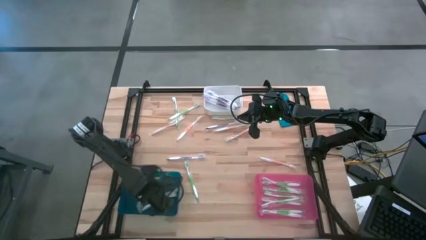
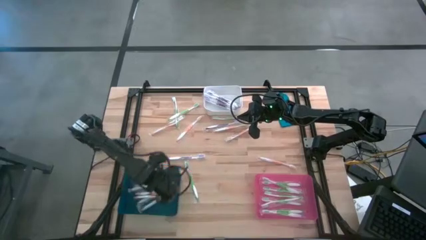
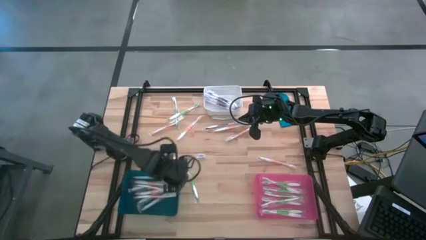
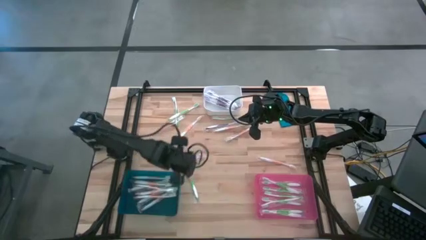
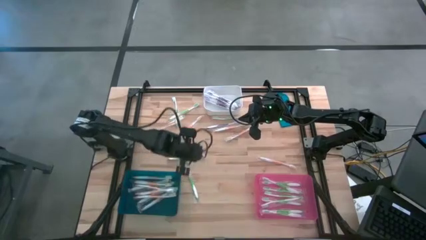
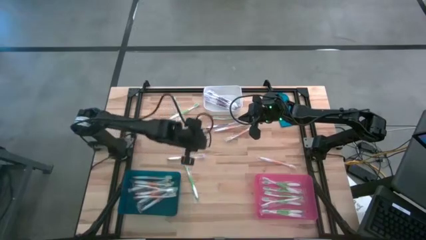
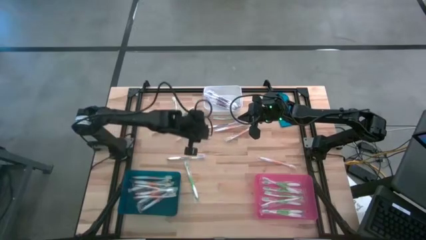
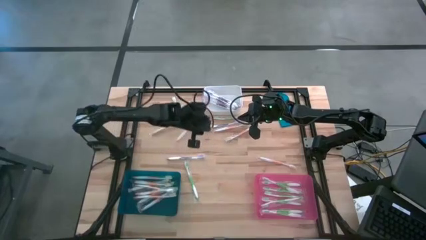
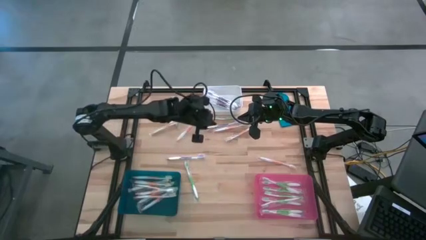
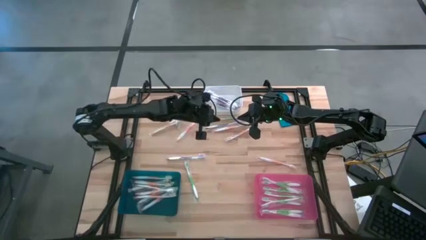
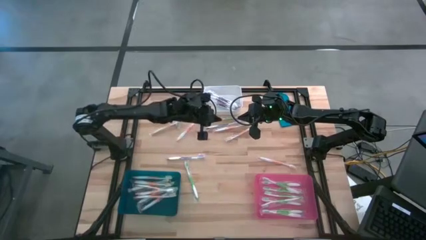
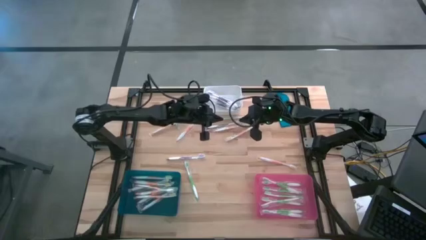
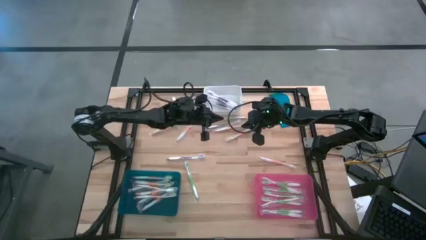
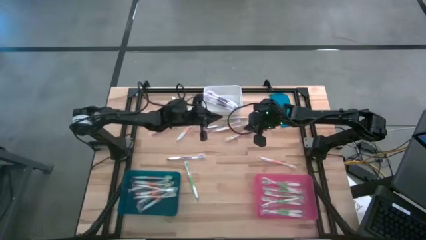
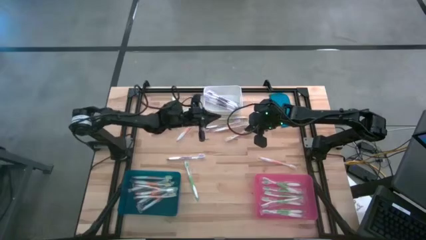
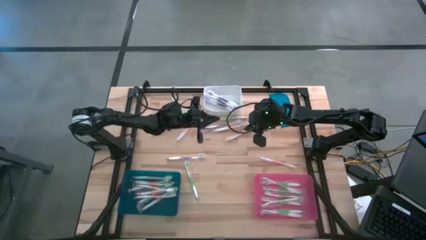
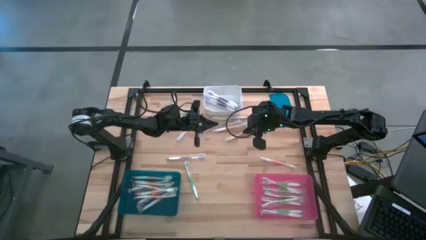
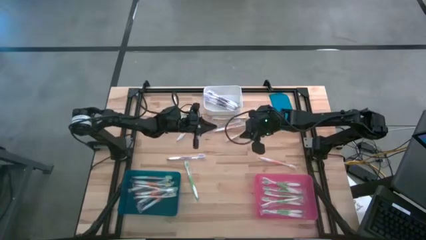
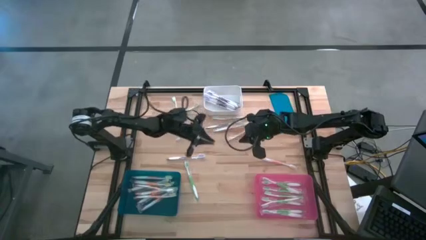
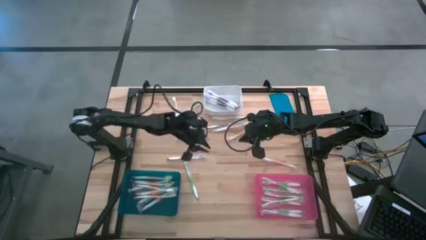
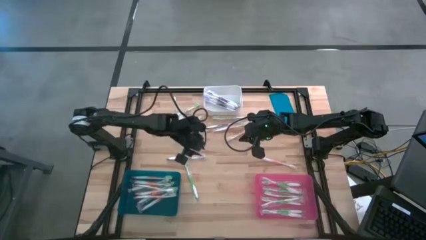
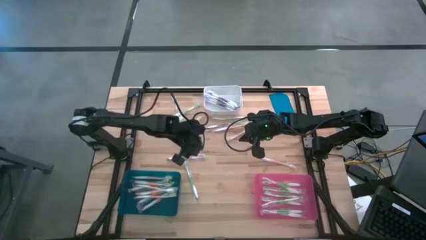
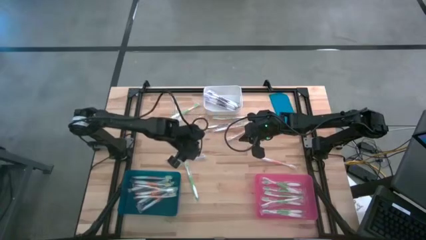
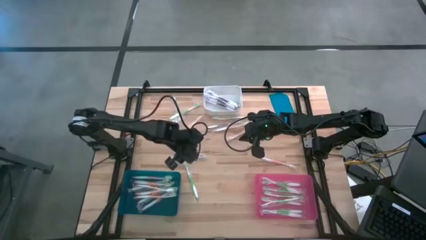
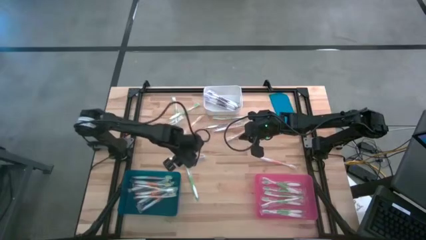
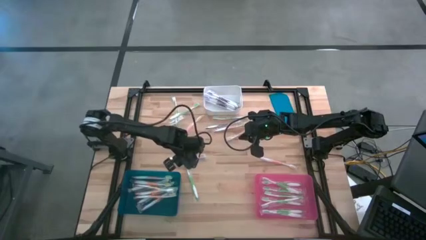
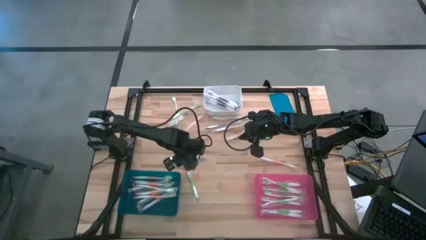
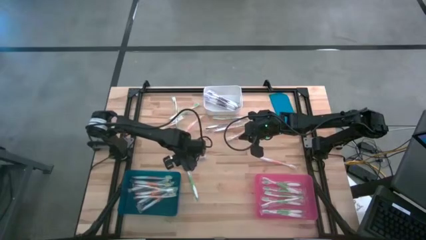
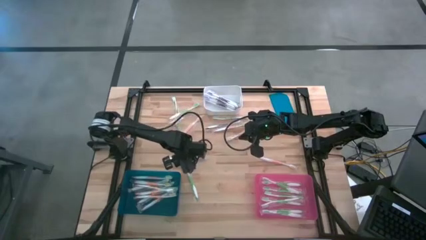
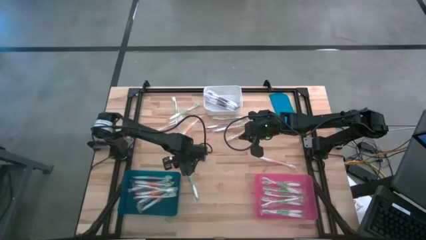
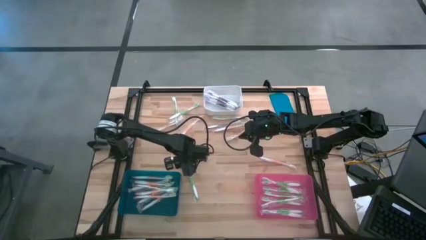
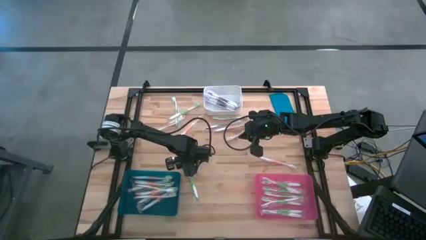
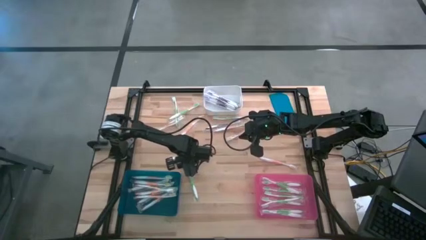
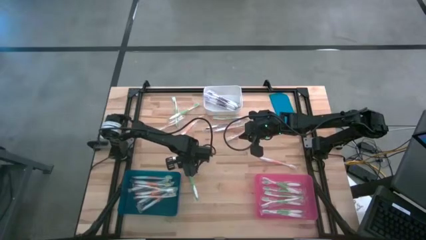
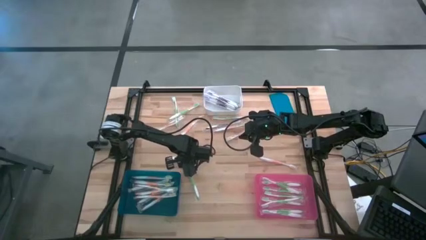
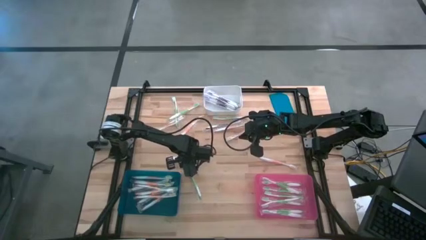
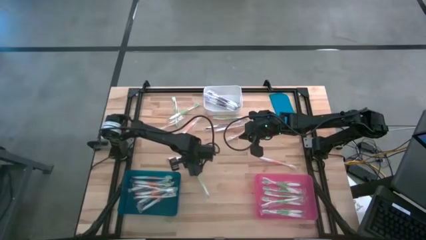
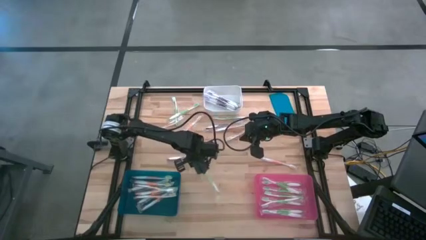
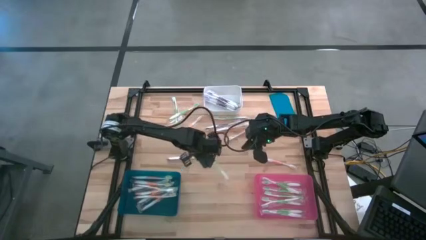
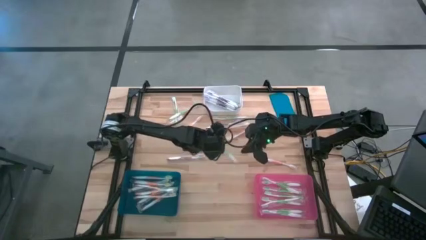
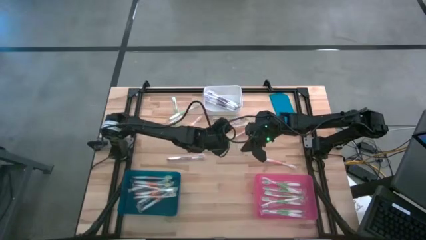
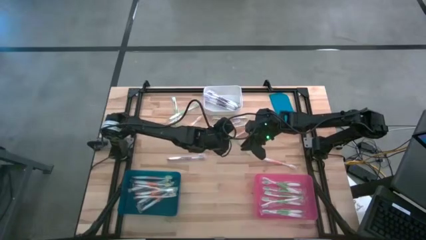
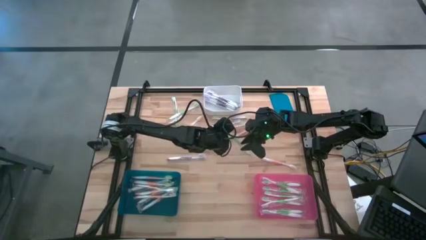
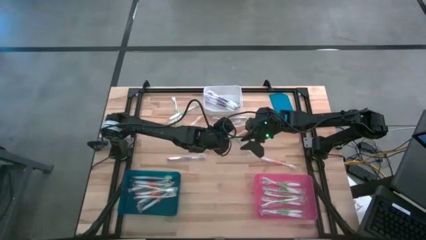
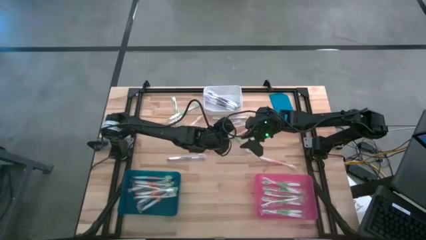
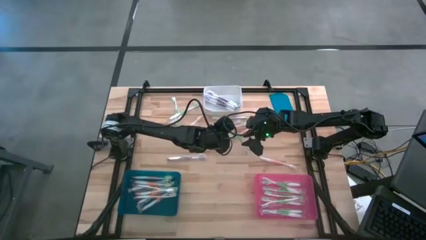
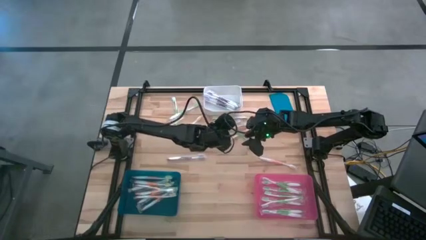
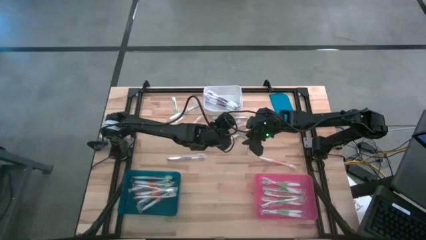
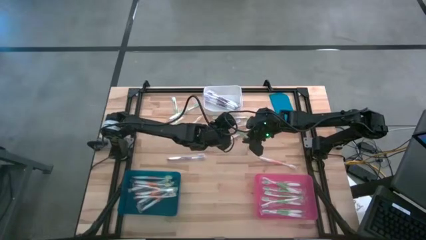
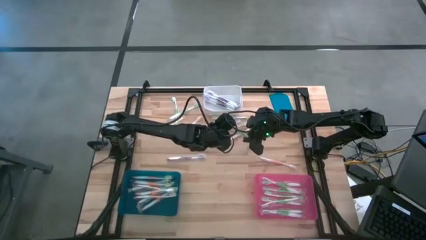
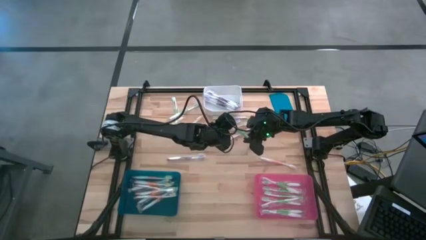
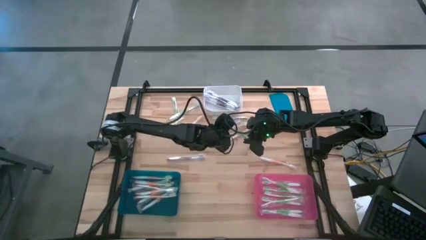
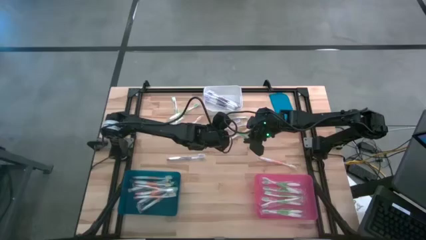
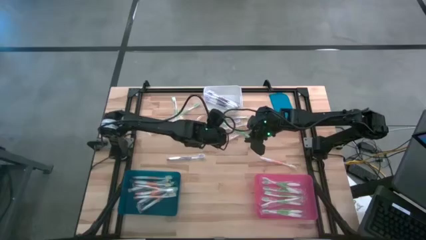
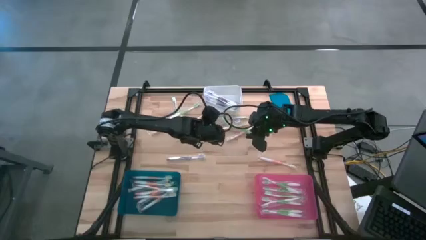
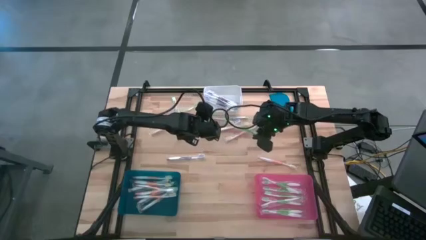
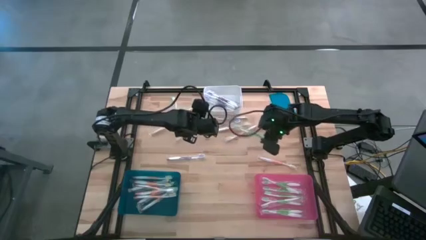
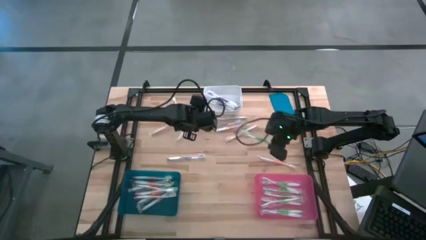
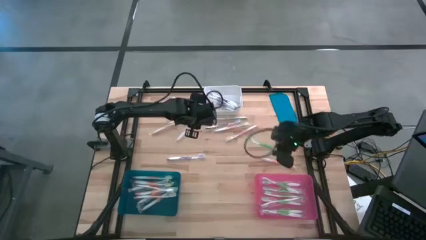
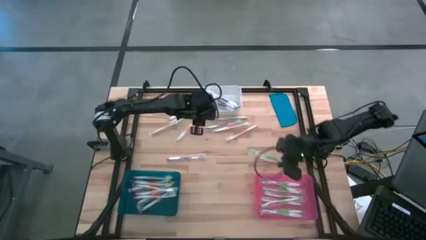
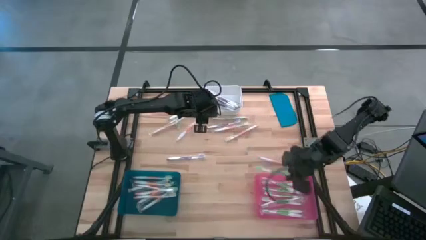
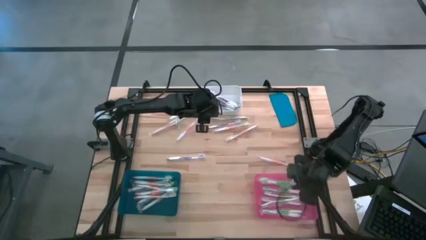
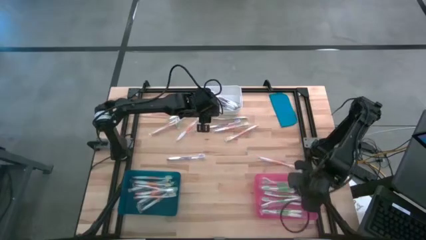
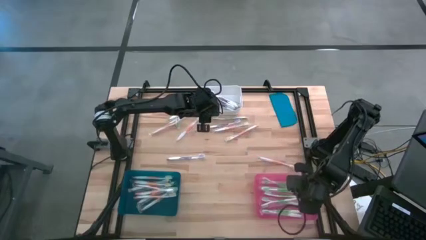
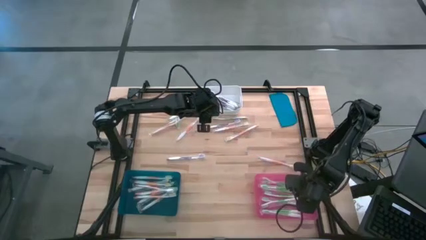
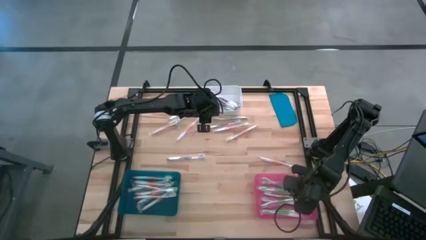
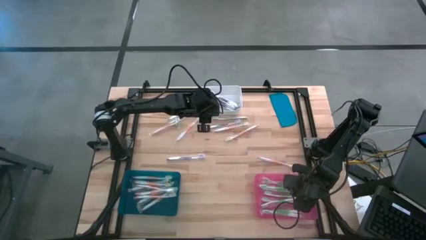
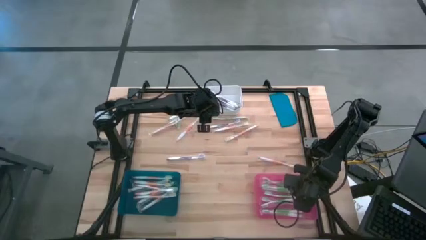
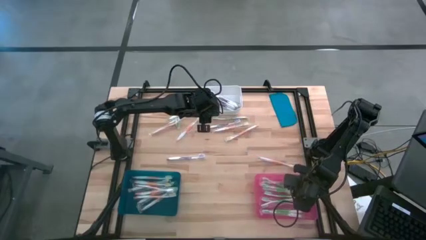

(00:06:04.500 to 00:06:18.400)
Task: Pick & Place Toothbrushes
Put the green toothbrush into the pink bin
